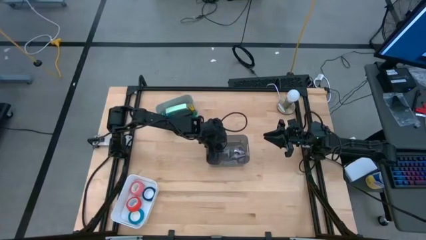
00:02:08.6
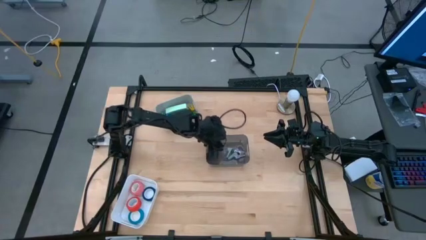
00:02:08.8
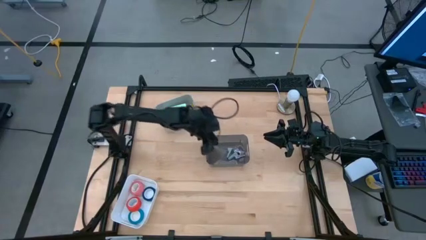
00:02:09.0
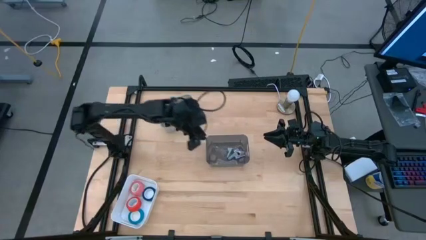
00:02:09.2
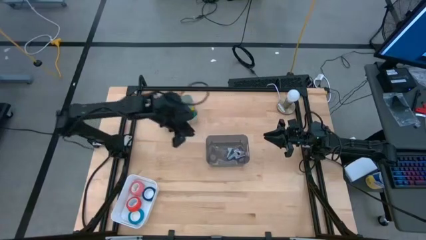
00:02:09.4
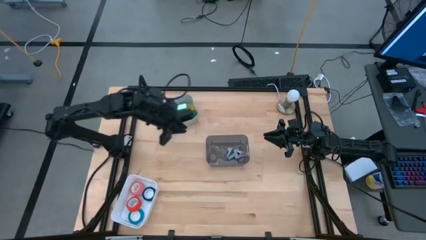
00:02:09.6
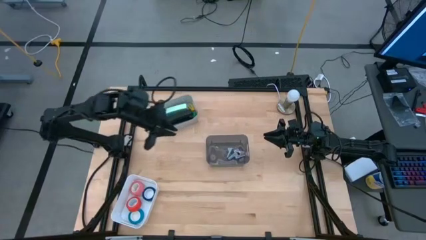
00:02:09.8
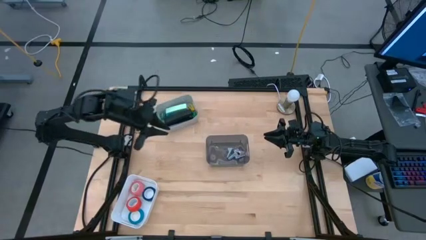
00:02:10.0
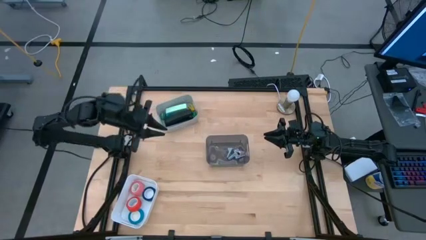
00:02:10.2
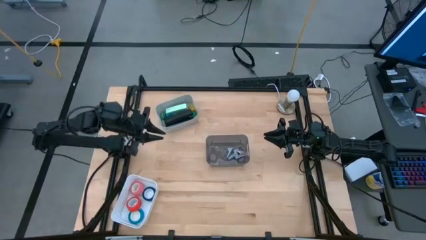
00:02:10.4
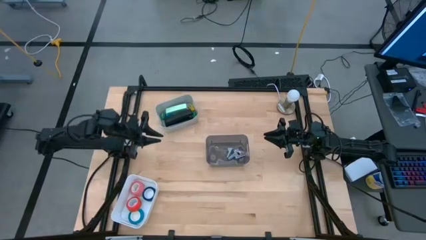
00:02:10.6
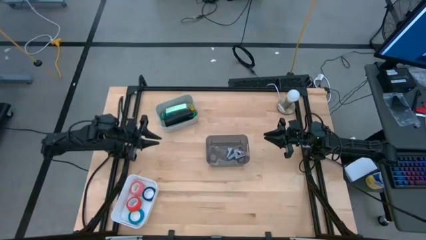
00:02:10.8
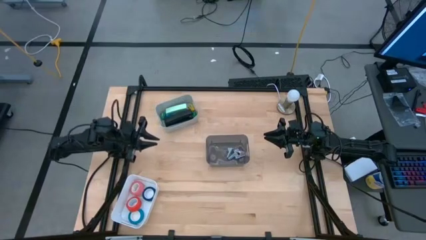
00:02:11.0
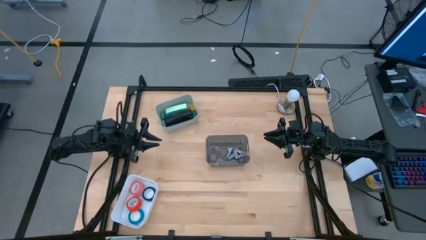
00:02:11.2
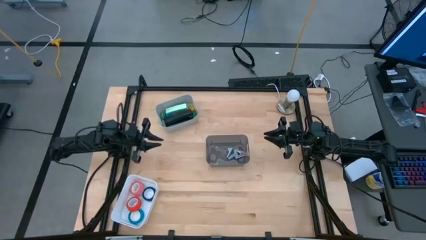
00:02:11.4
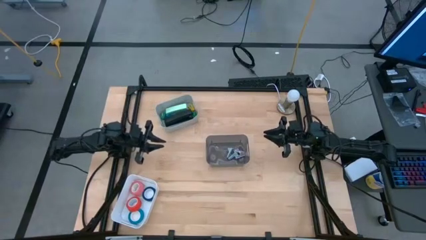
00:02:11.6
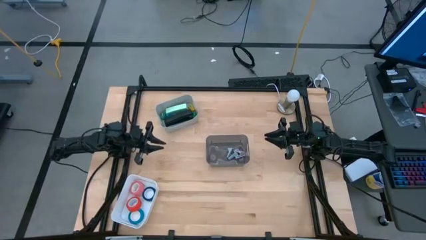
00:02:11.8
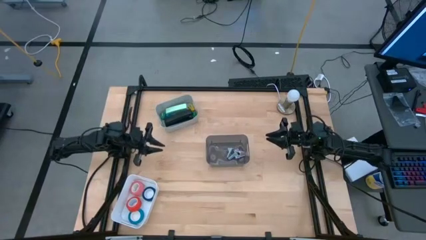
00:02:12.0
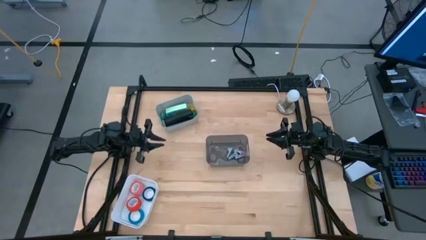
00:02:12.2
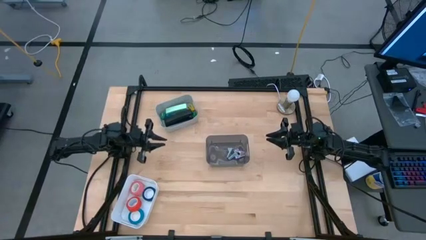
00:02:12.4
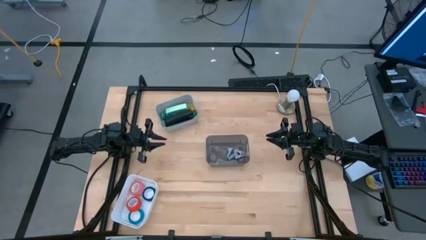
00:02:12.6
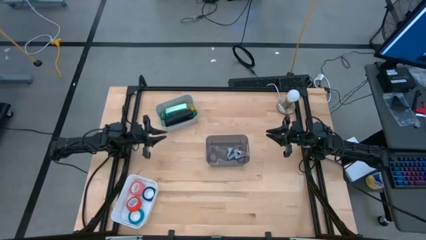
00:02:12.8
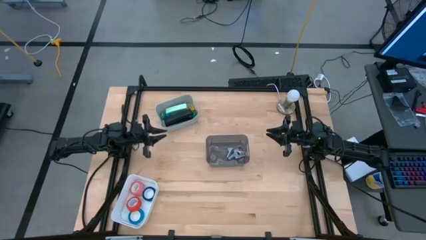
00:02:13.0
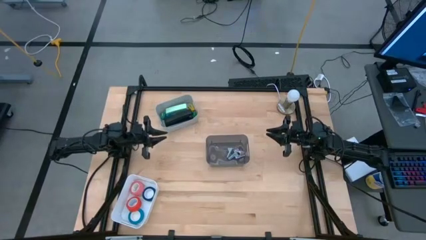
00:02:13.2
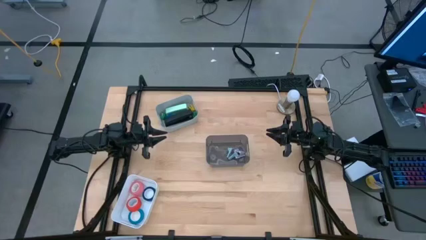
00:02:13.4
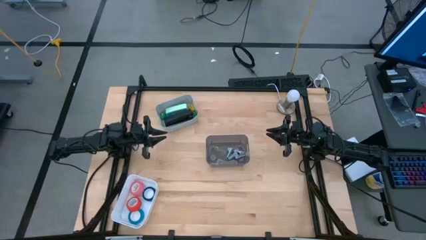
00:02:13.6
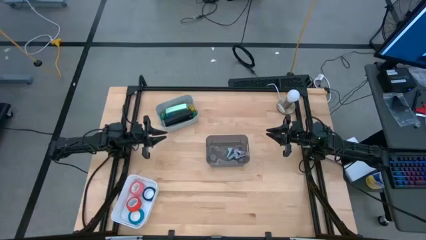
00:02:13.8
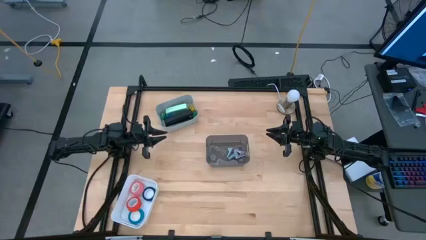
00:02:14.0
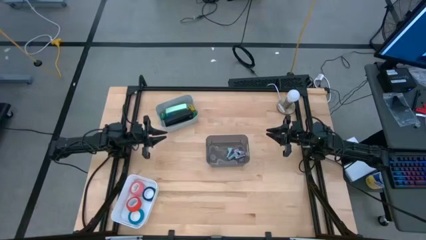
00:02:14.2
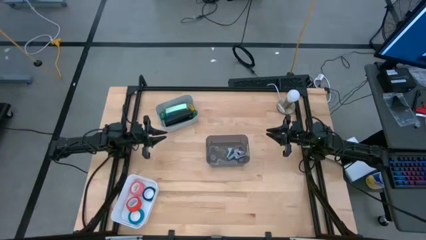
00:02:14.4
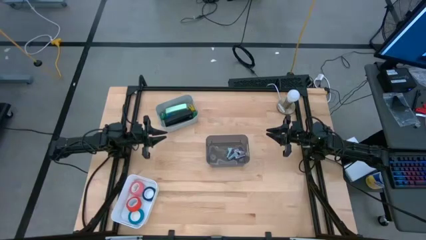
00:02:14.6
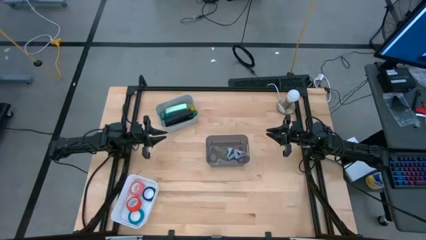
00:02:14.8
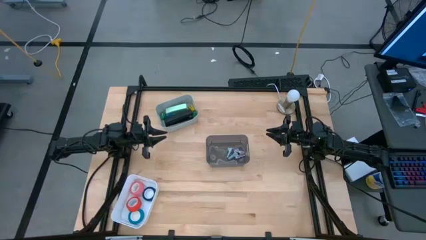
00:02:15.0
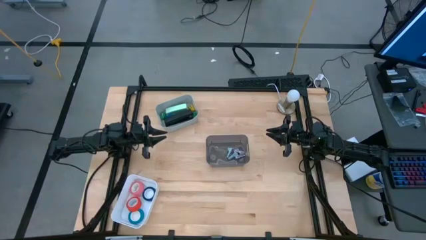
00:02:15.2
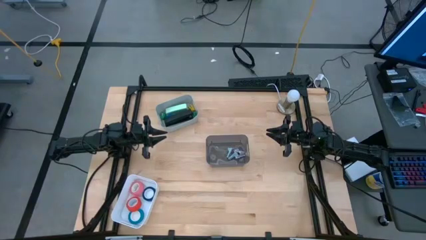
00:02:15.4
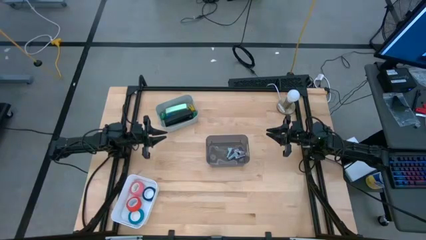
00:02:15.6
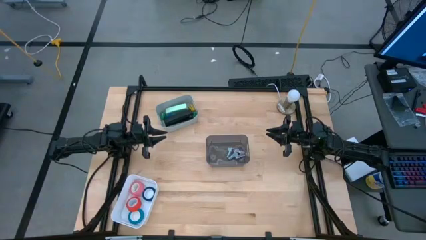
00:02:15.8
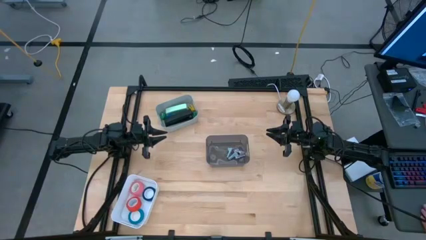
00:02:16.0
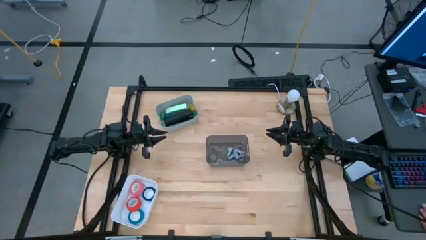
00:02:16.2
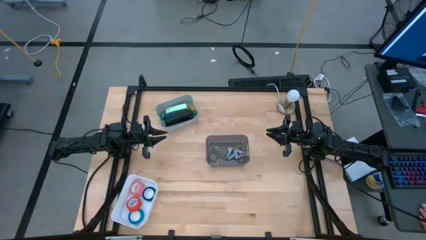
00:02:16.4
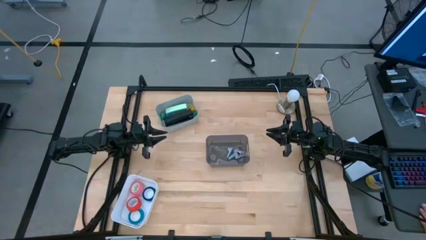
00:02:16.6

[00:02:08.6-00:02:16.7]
Task: Pick and place Stapler, Stapler remover, tape
Return to Home Position

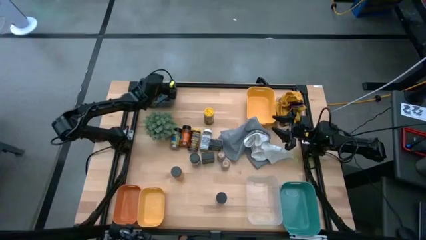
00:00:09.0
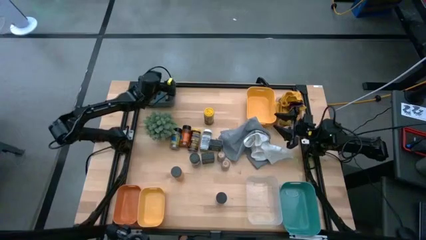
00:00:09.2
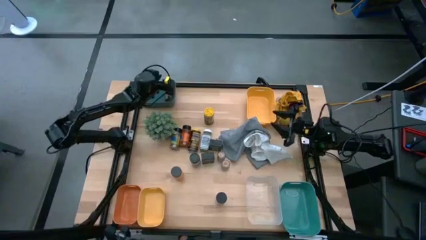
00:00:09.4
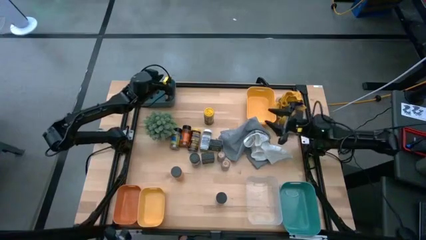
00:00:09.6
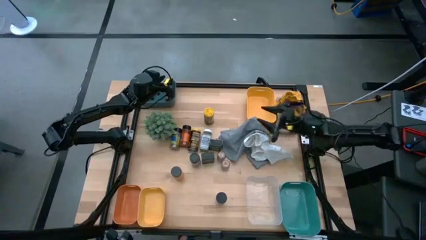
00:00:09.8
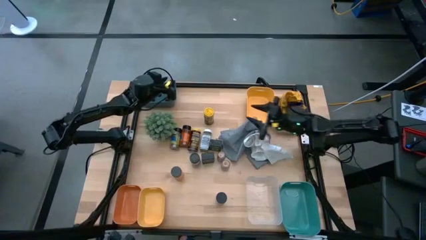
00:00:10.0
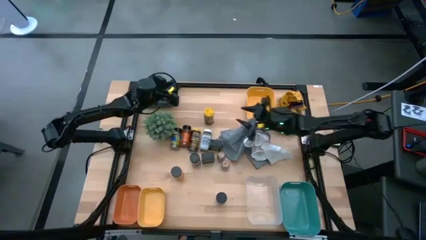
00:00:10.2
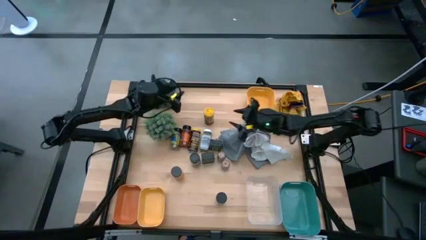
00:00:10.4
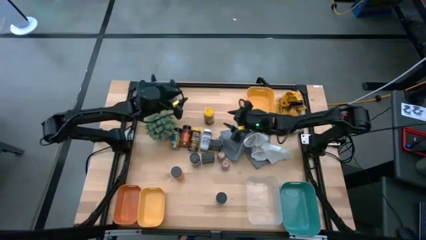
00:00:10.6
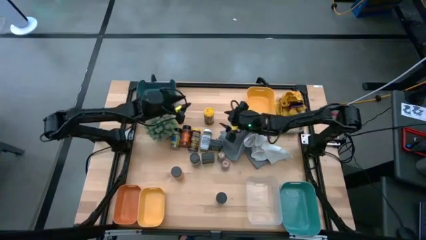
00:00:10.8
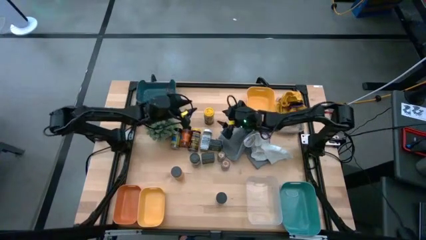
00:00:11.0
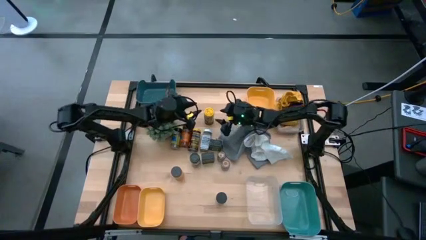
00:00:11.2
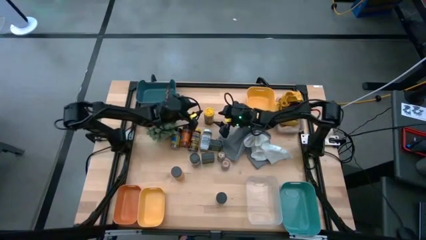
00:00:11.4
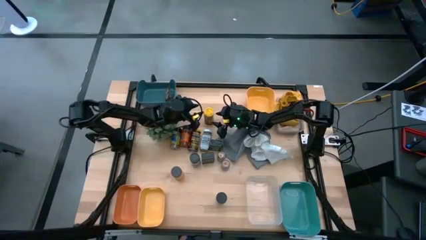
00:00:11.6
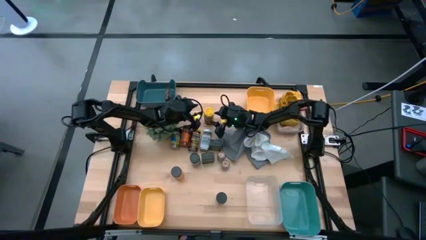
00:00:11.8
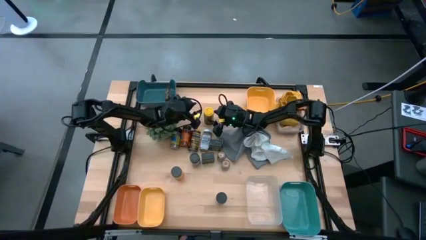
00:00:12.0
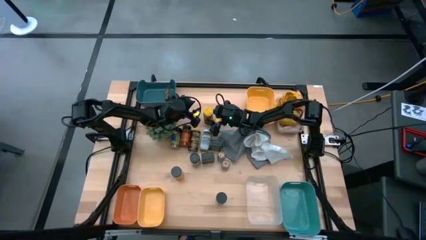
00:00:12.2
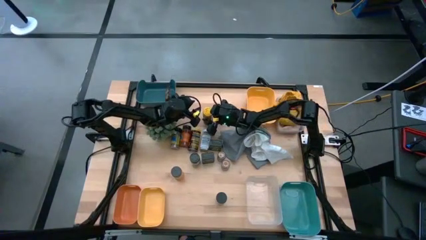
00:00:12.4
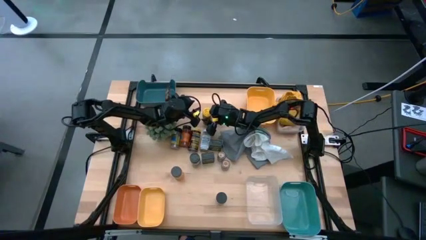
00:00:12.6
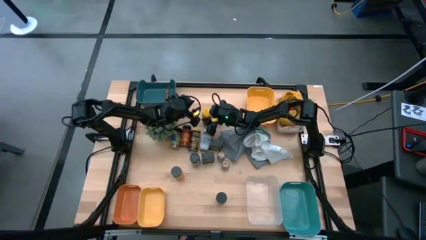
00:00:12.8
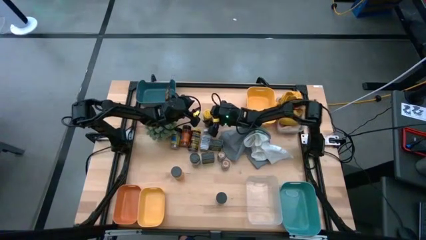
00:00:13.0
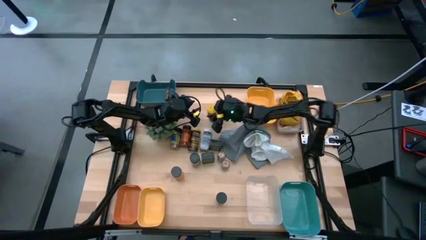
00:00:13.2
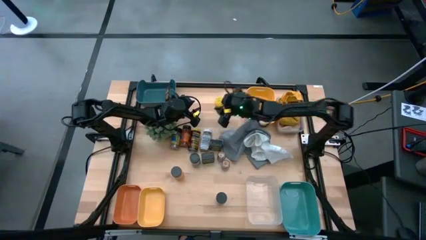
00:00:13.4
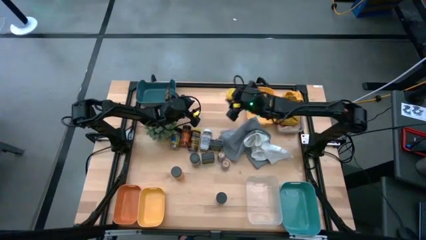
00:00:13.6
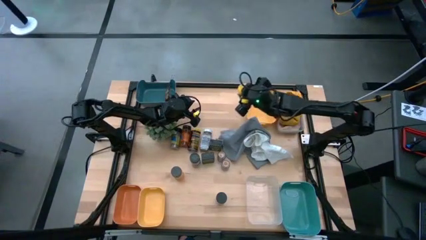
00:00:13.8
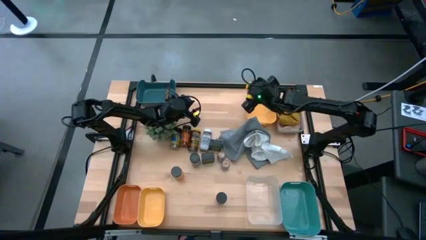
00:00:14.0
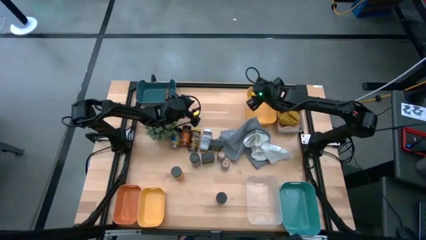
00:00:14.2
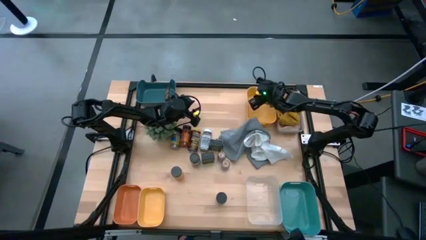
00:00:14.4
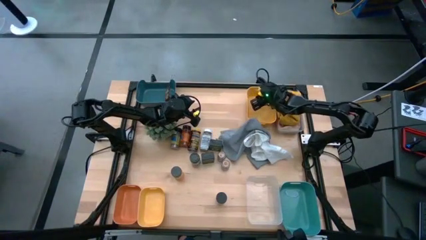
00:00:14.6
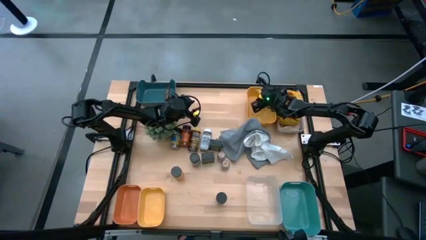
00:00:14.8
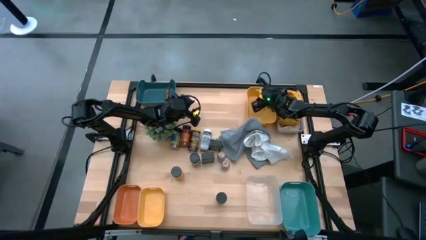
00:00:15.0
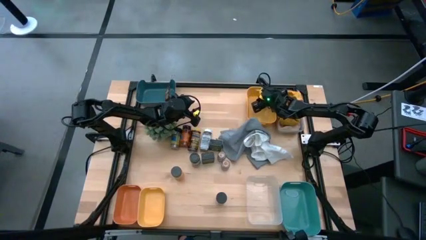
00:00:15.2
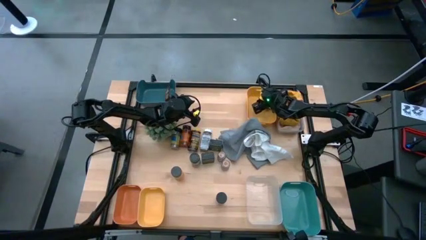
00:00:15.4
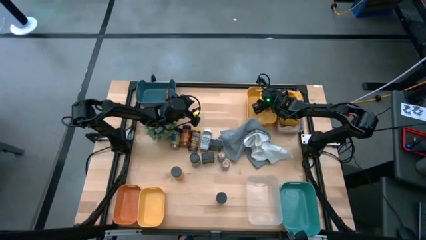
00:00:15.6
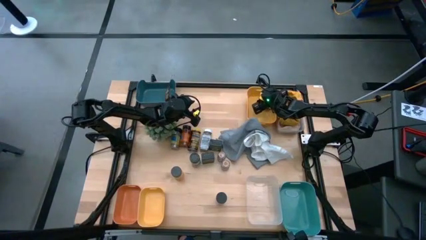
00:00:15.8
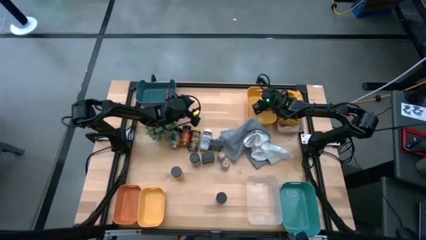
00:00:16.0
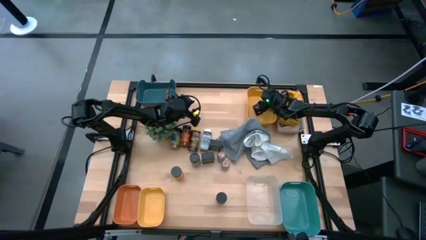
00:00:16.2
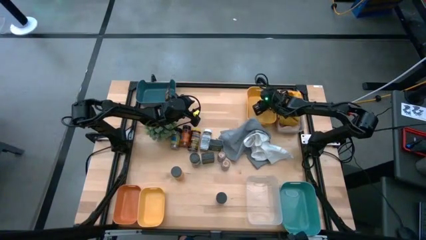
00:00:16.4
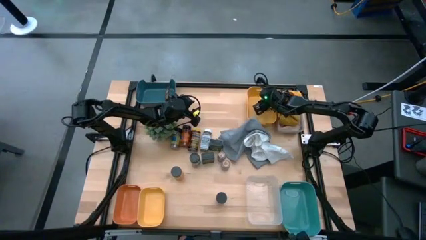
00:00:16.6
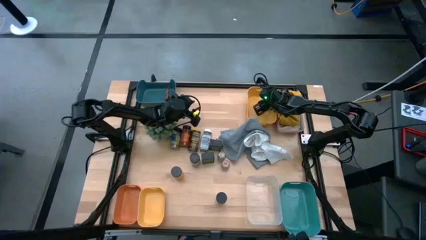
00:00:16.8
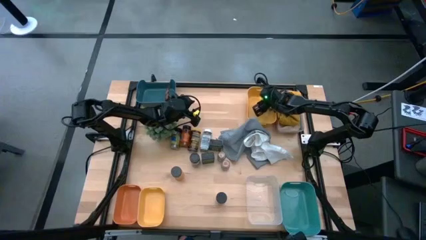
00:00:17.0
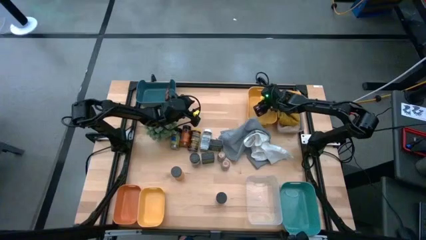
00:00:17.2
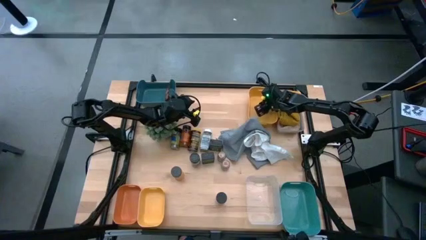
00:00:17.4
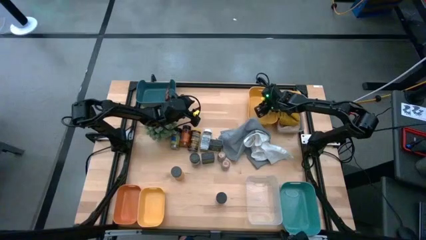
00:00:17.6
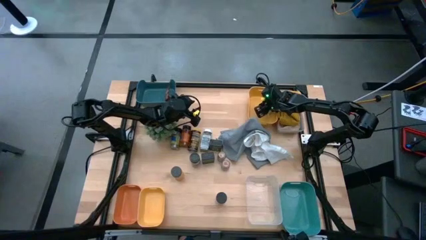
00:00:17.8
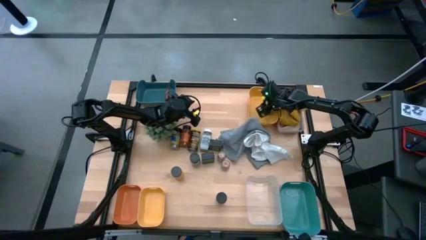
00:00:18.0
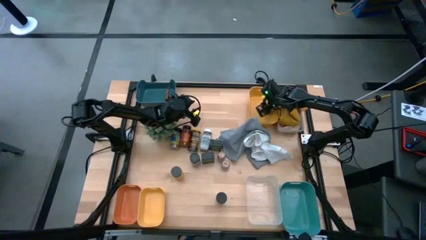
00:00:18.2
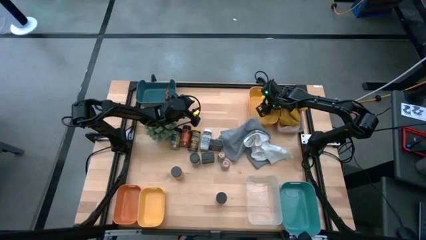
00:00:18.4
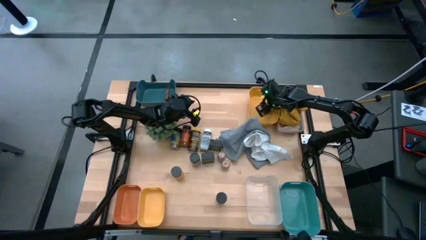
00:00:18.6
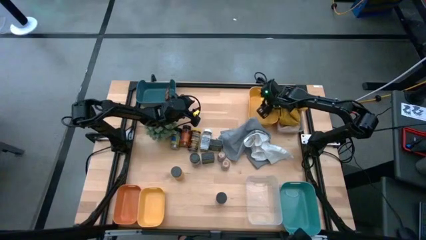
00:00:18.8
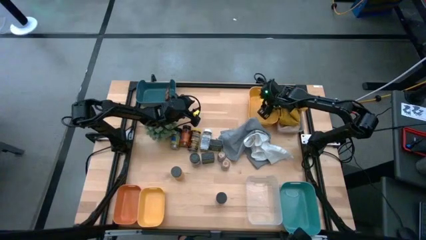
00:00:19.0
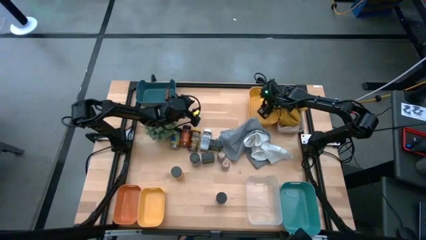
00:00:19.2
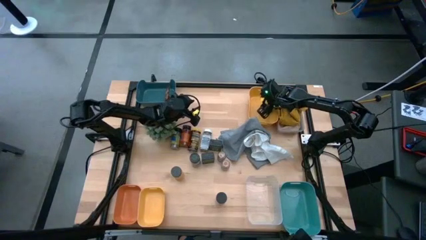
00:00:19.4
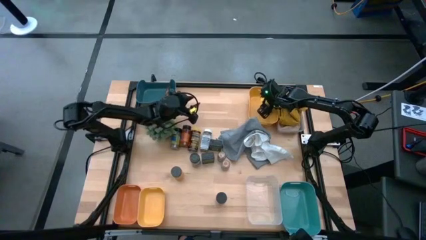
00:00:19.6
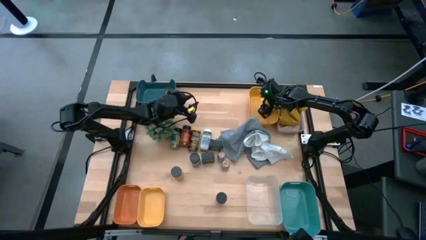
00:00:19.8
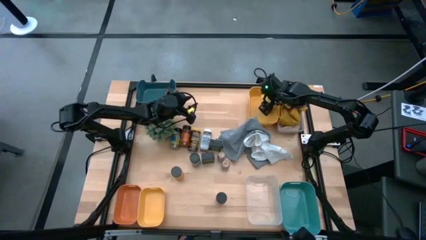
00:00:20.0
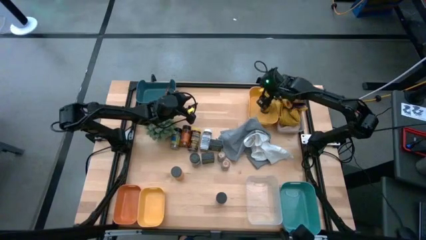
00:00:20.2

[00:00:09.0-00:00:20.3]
Task: Sort spices by type
Put the yellow seasoning bottle into the top yellow bin
